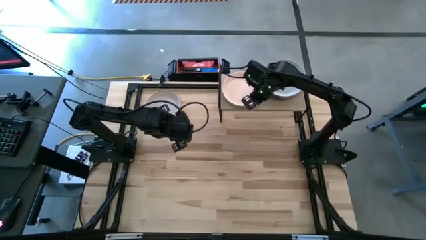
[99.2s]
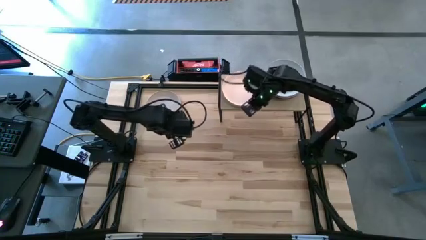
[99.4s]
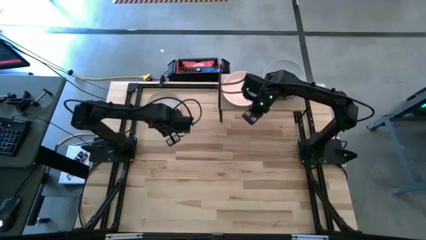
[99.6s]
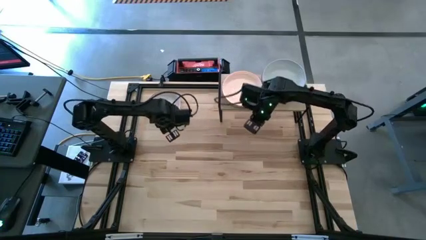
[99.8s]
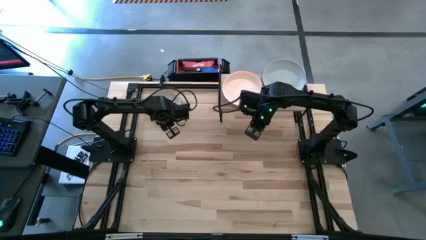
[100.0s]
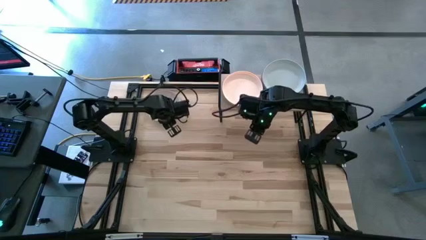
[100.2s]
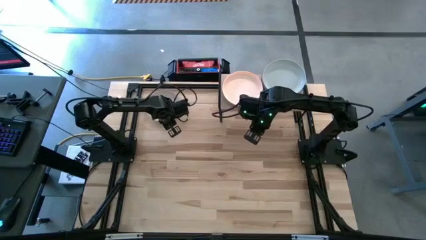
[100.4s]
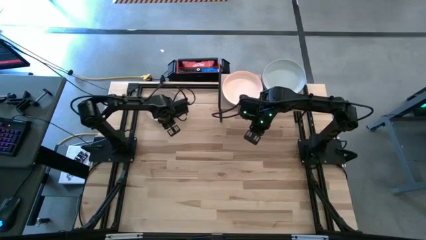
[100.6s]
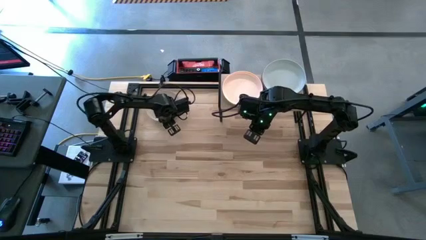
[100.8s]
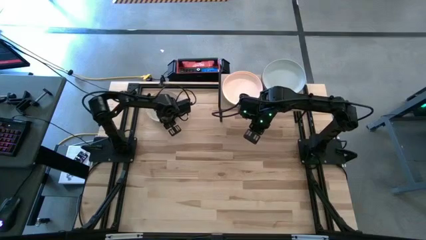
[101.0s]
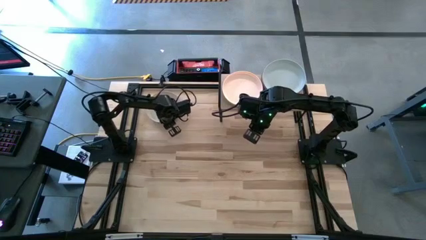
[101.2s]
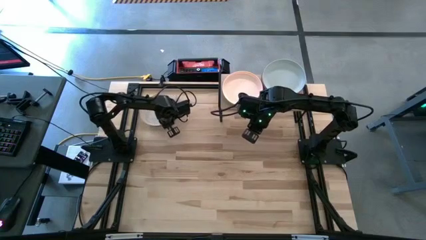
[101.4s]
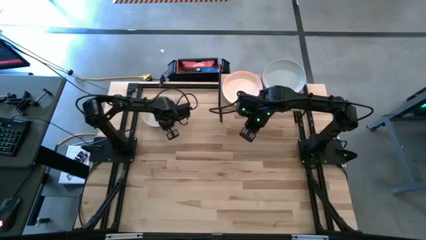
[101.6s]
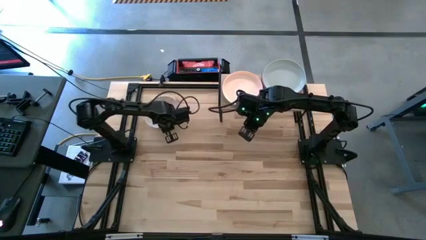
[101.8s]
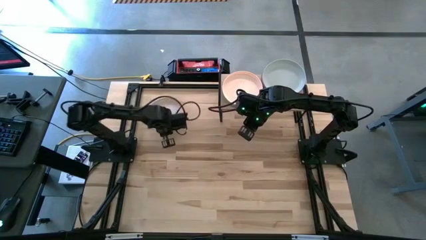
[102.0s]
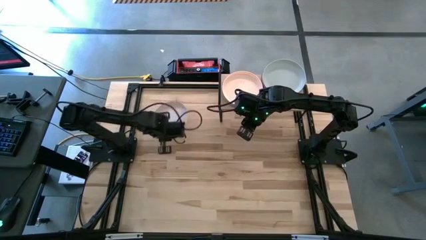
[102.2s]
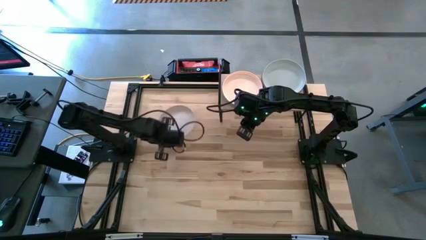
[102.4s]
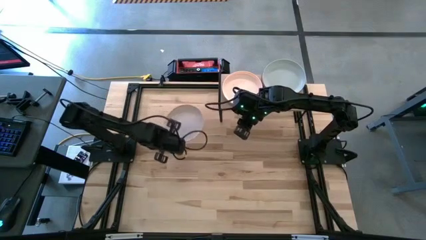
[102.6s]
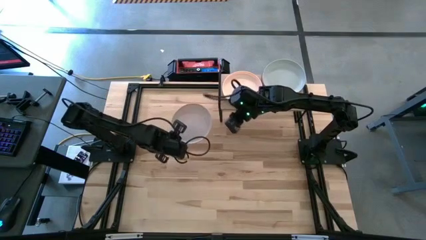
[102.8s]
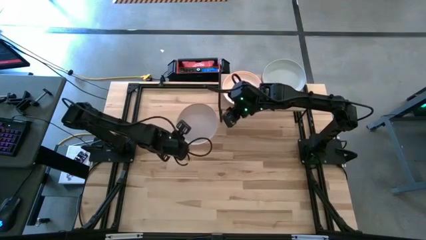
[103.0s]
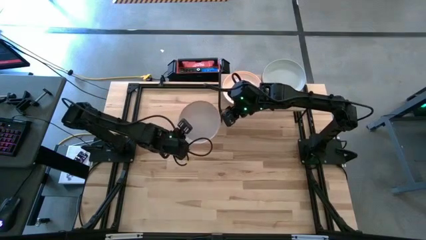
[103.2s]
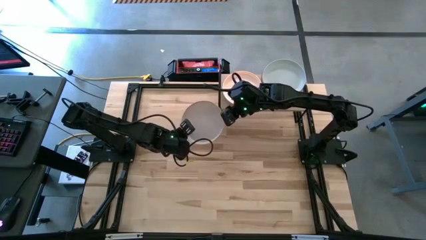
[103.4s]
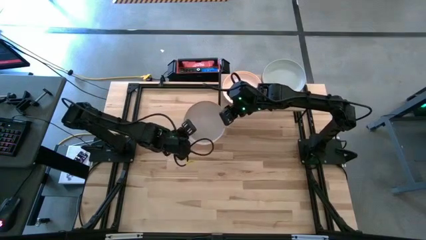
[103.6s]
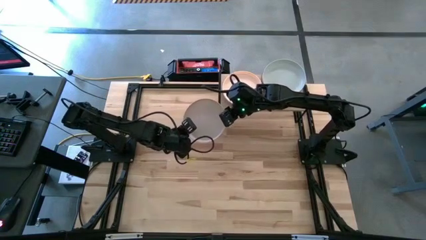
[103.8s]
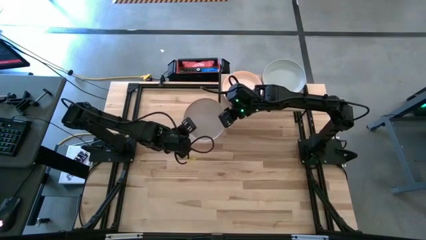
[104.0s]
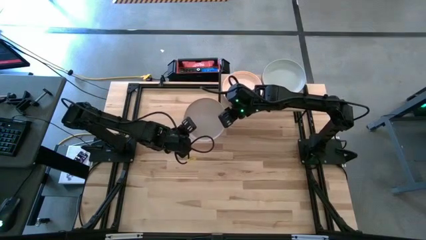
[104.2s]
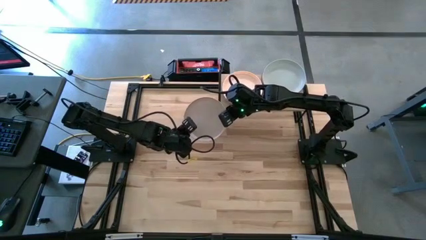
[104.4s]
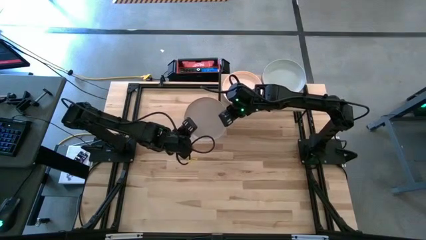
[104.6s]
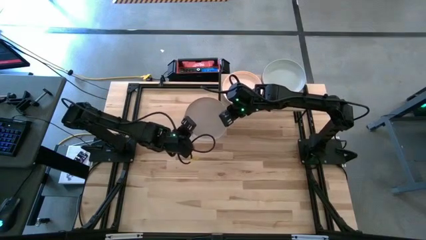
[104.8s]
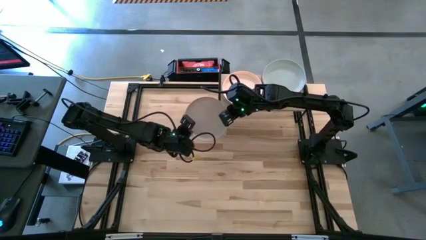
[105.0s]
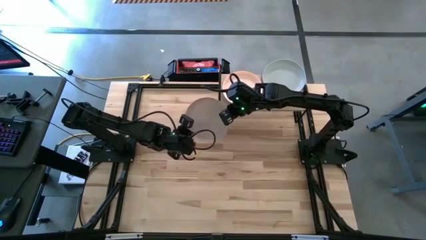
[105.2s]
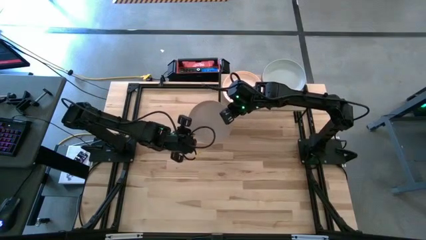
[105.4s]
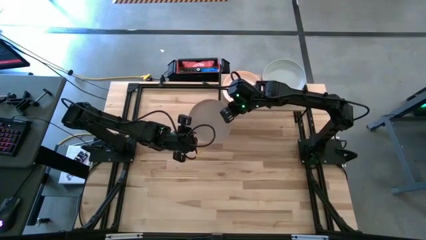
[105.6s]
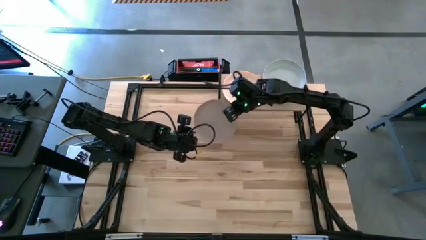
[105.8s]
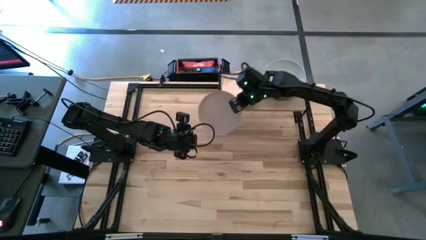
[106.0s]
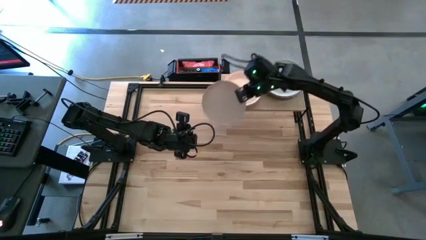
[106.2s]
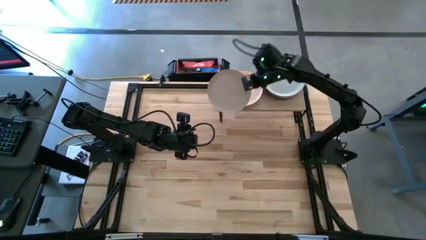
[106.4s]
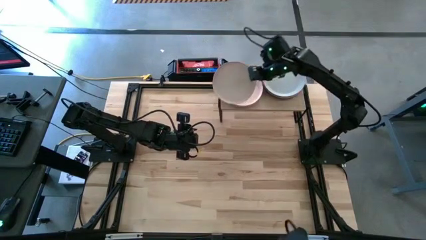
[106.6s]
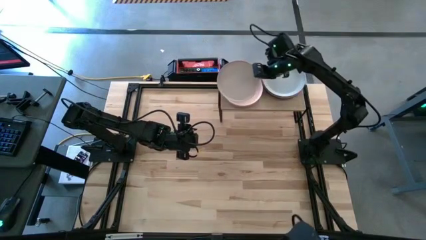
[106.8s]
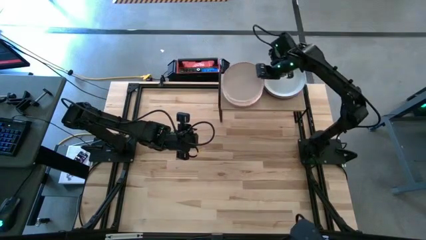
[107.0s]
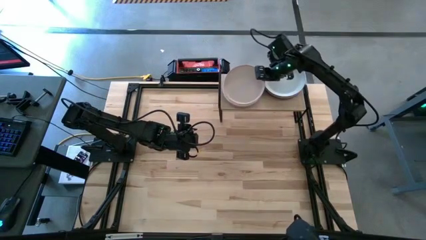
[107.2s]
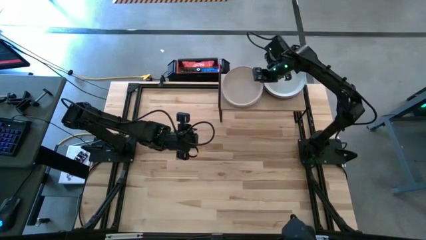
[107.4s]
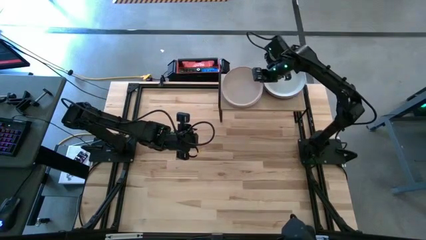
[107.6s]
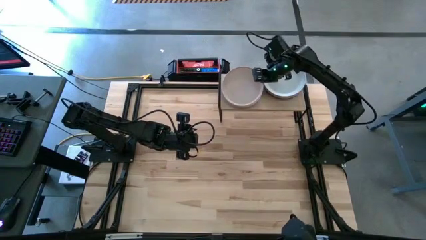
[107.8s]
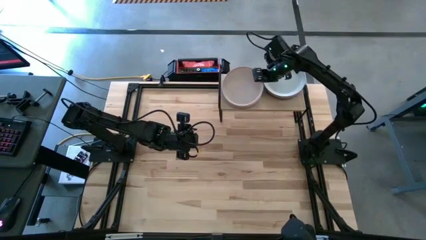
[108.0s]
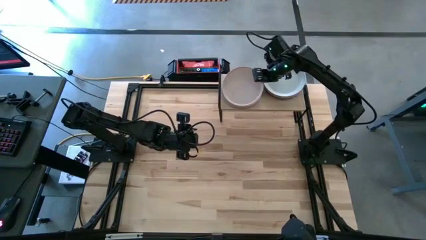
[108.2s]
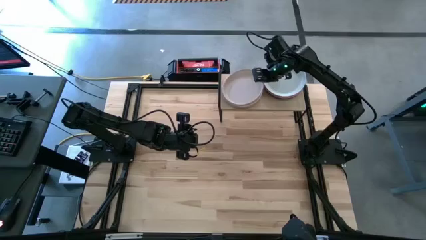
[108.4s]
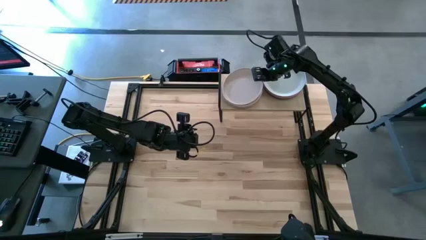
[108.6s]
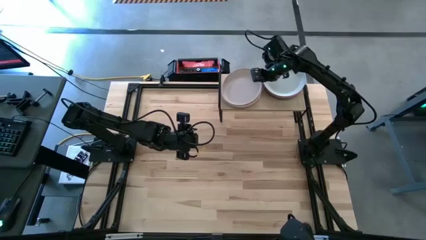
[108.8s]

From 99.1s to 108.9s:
Task: Place and stack plates onto a shelf
Stack the gray plate on top of the light brown plate on the shelf

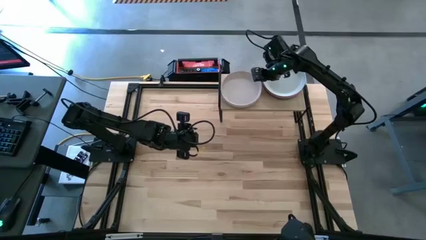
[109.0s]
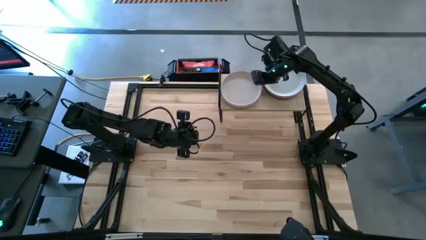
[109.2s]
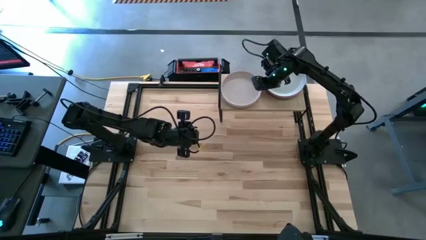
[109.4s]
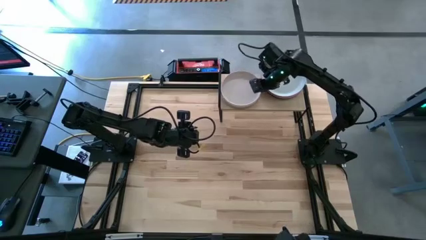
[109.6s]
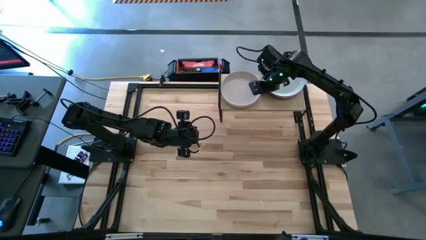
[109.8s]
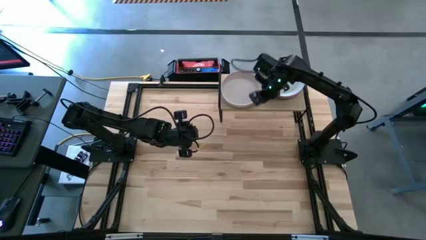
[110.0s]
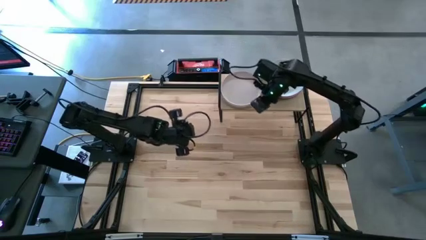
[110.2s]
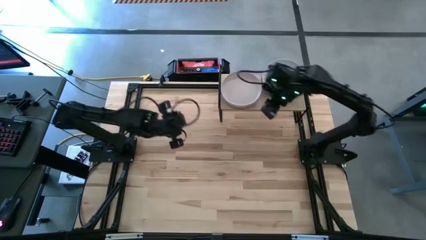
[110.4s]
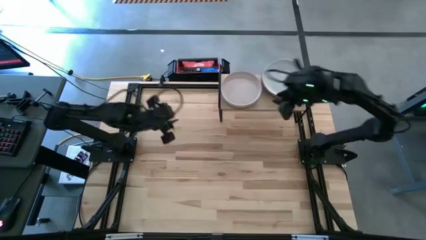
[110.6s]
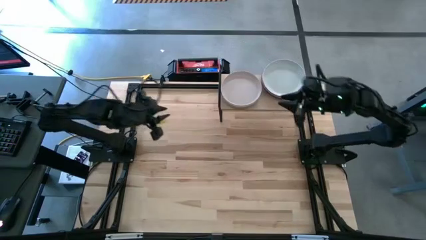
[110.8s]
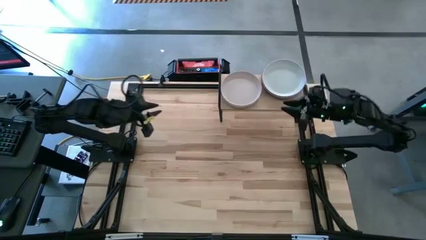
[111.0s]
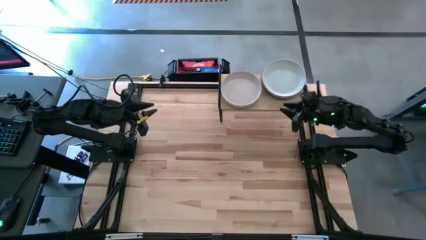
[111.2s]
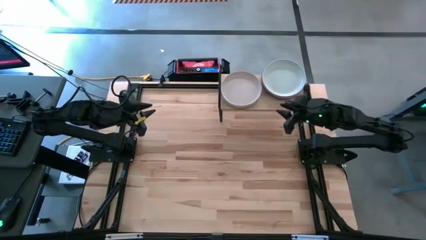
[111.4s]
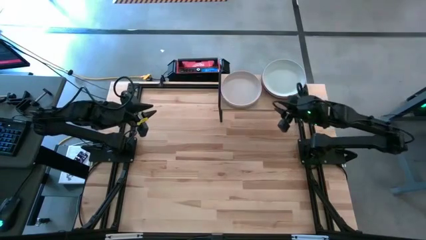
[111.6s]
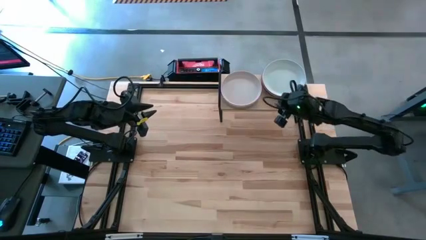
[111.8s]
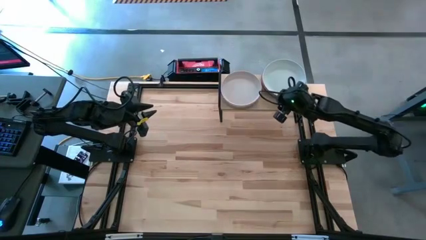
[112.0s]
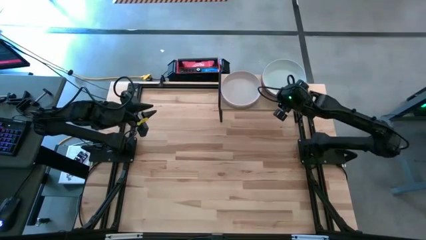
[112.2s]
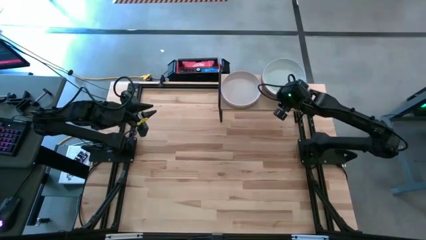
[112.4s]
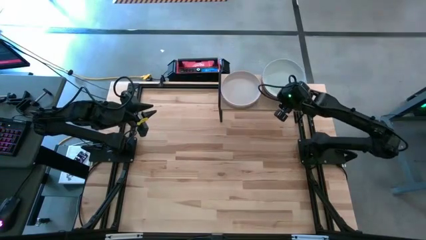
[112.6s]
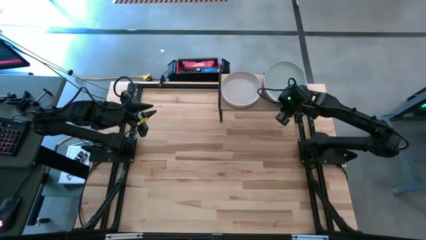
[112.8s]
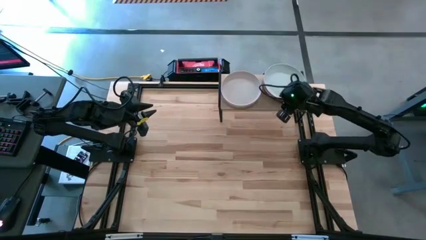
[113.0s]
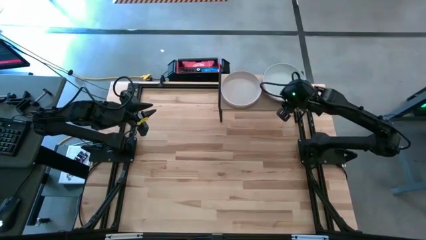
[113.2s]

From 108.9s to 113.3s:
Adjust the right stacked plates

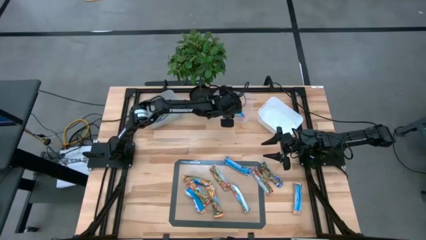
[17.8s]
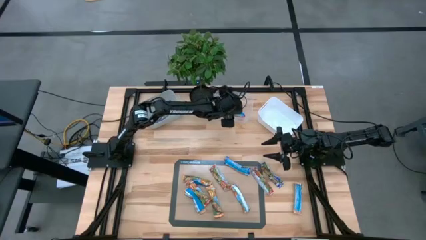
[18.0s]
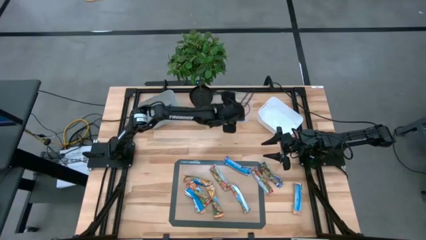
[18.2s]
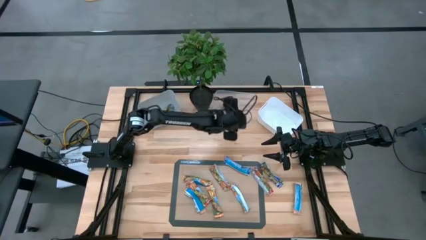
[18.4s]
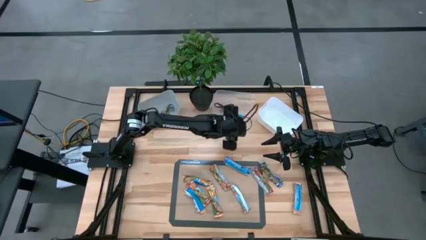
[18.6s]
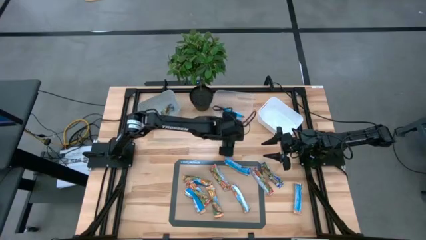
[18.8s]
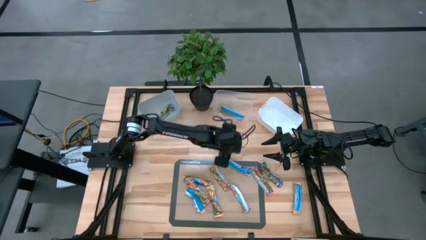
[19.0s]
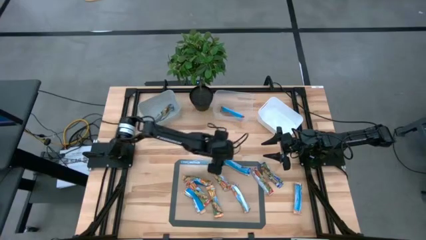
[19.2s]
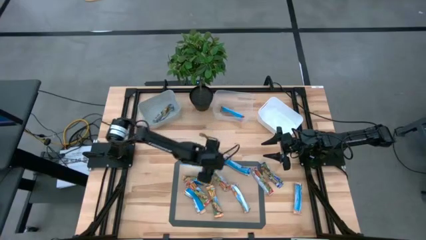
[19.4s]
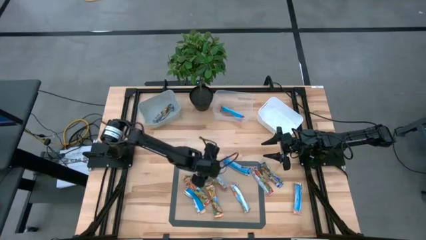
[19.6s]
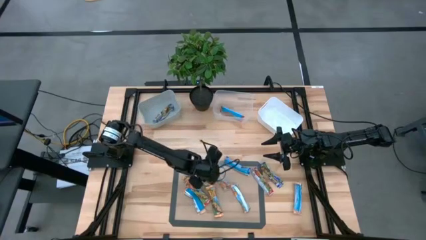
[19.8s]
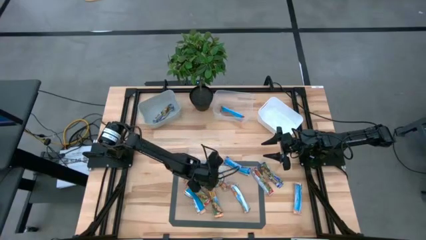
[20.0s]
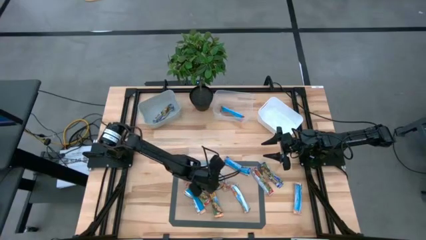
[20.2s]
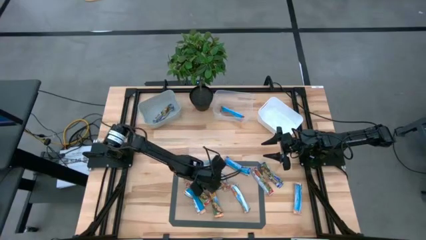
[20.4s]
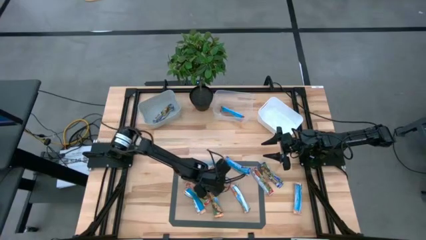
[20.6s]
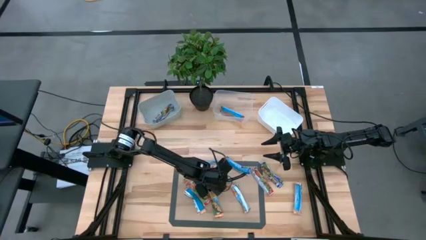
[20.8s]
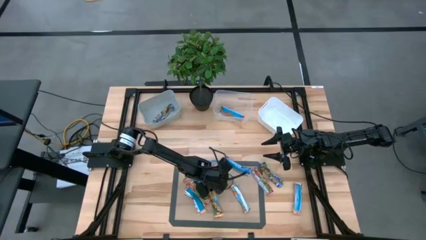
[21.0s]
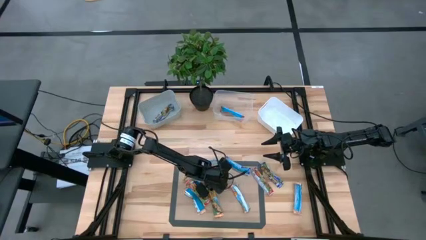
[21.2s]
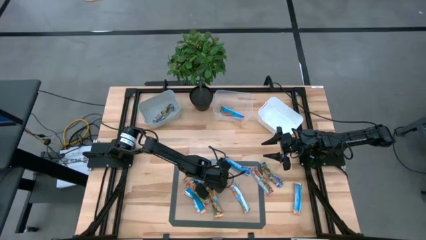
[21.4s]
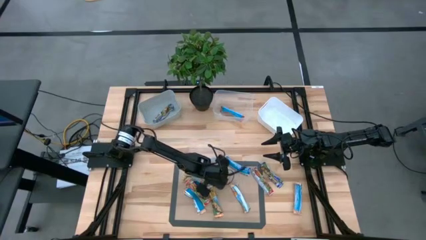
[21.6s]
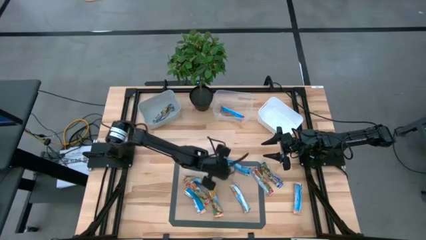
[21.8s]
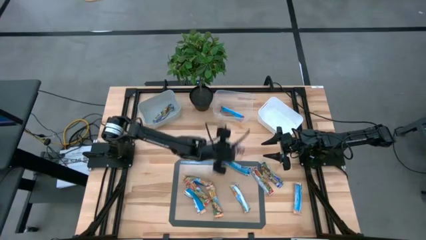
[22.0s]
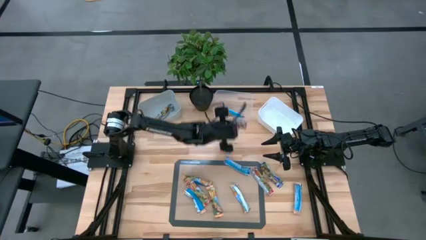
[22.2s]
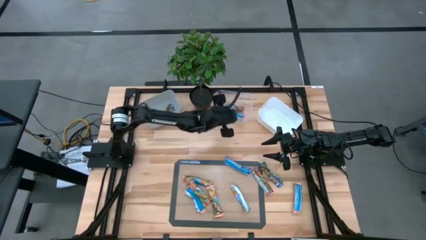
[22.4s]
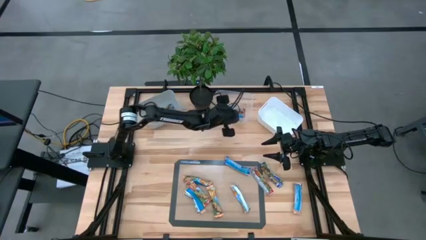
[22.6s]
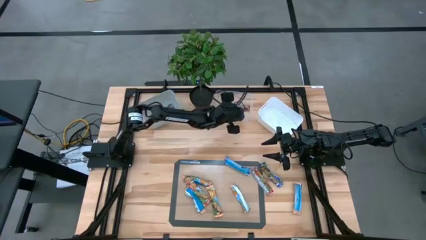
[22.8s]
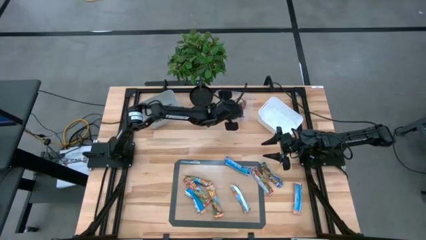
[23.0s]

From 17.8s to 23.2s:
Task: Pick and place Granola Bars by type
Put the red granola bar into the transparent bin
